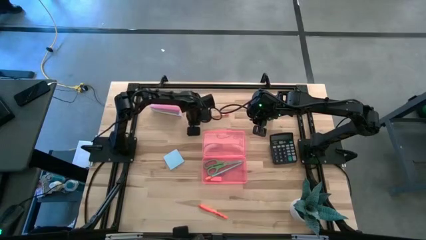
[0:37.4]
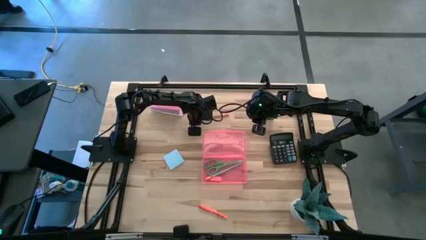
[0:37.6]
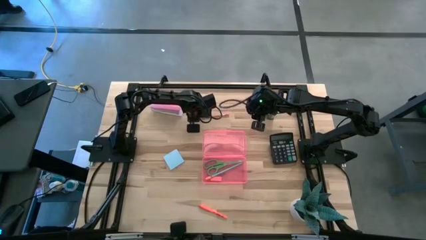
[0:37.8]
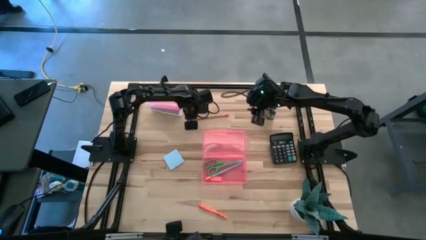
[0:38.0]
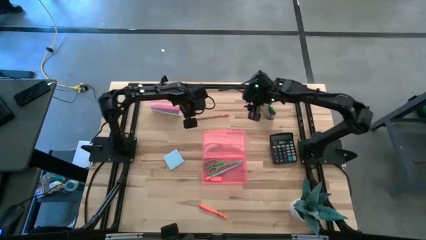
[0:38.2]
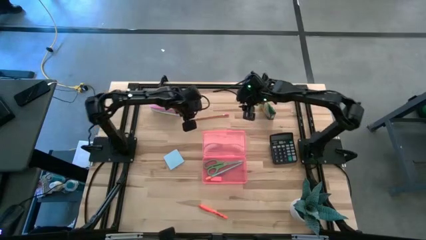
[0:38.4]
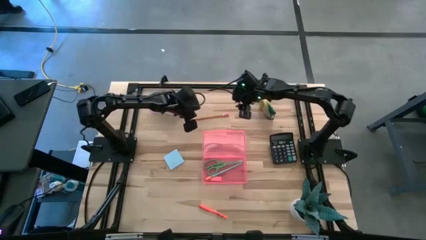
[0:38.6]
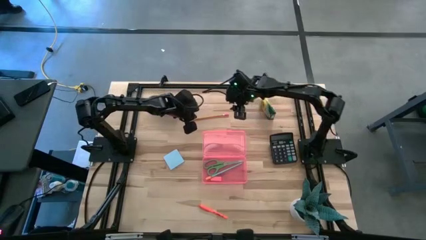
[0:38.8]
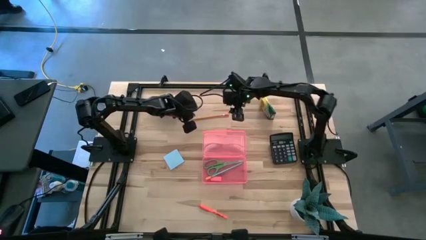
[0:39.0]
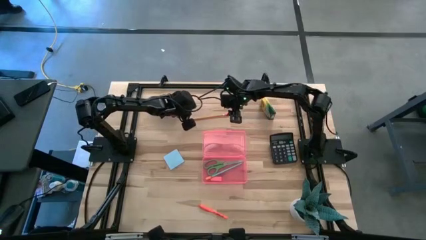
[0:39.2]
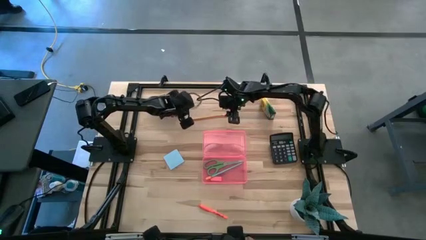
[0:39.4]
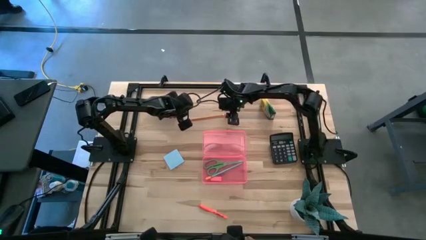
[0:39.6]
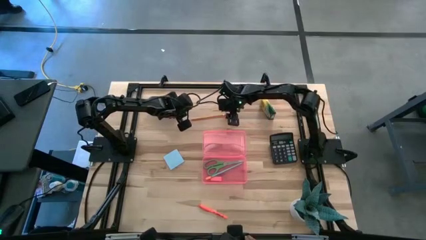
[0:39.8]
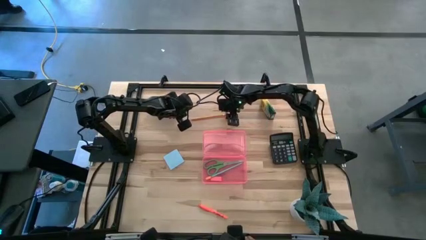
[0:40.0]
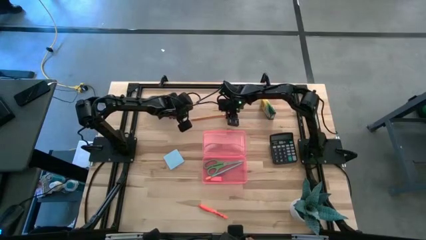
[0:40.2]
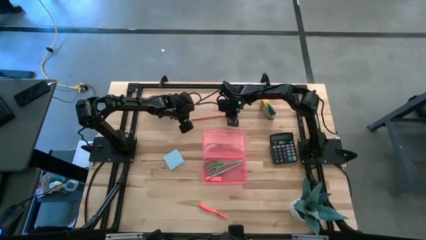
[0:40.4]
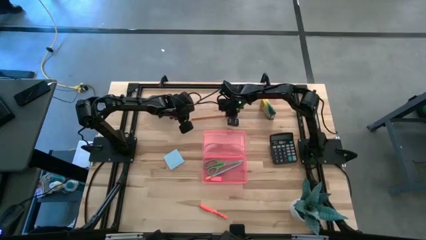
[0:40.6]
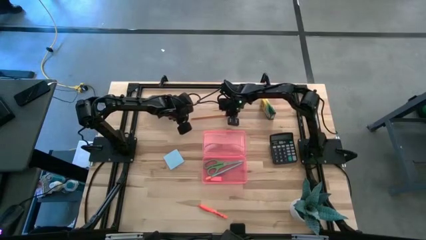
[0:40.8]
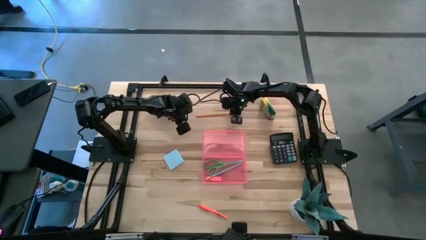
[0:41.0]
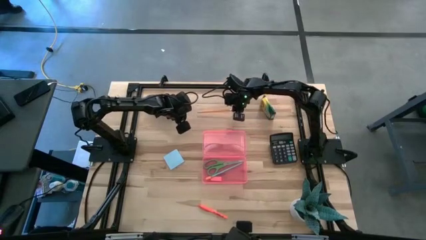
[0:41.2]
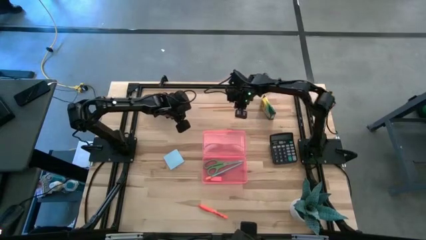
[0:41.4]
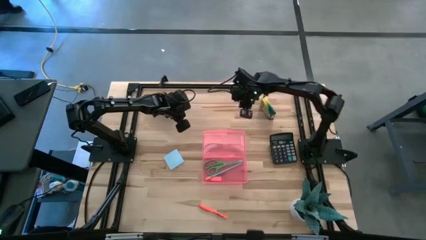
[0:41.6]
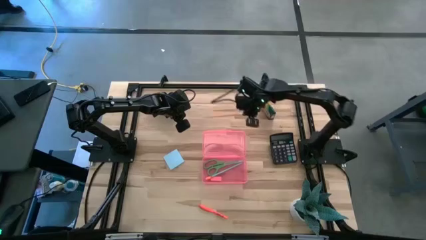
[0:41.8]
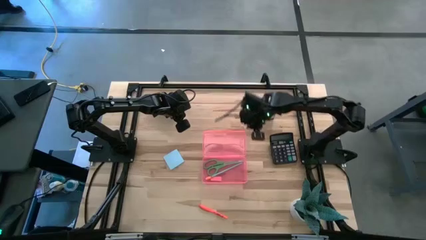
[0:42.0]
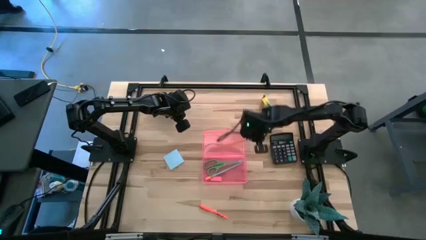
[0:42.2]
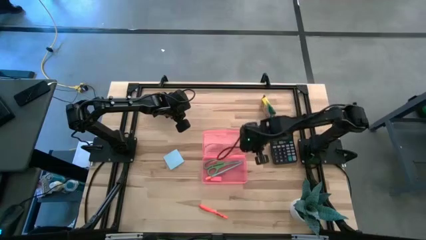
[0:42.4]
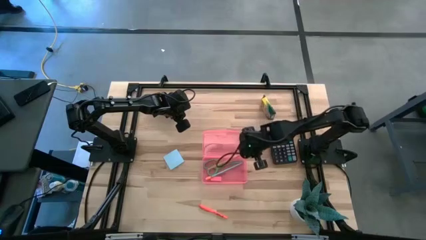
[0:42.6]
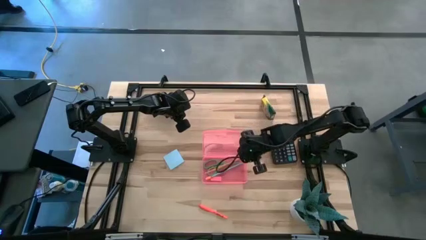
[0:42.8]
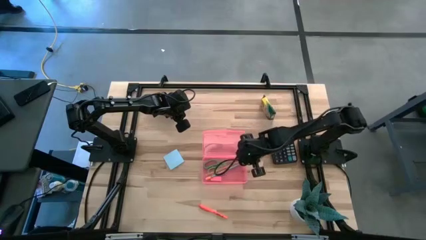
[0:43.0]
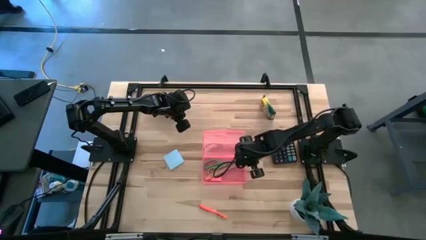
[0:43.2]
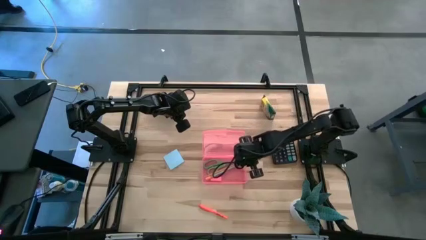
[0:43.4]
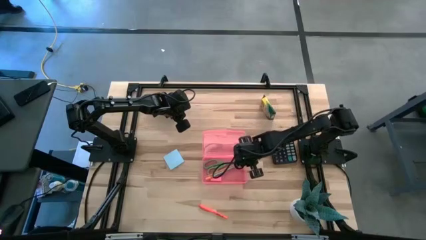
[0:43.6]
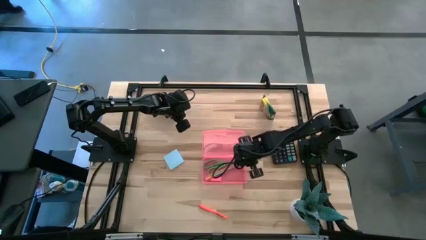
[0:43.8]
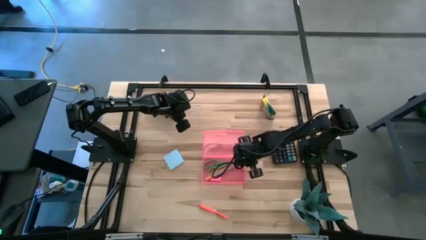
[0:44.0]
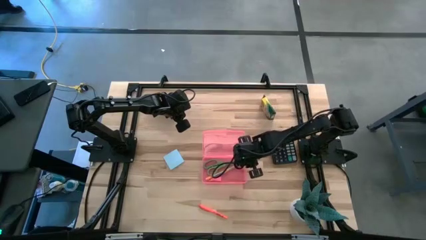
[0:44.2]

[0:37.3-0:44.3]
Task: Pack school essentials
Put the orange pencil into the supply box

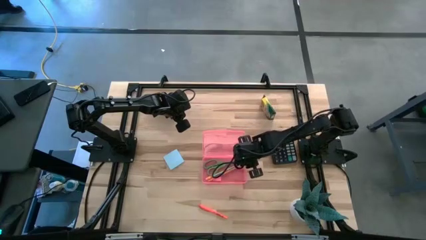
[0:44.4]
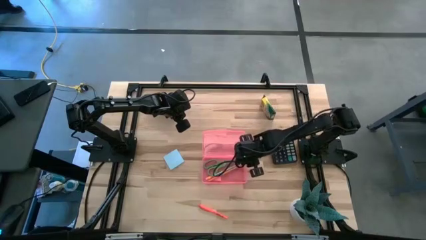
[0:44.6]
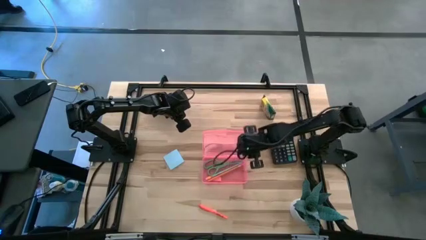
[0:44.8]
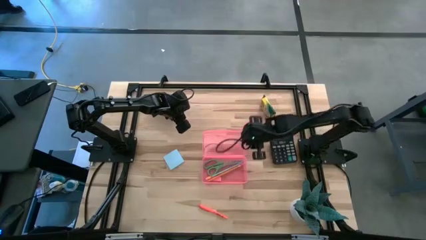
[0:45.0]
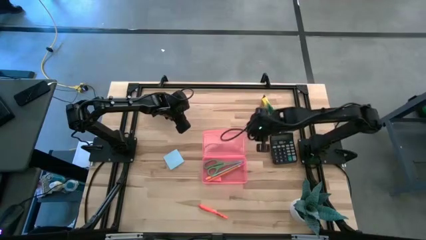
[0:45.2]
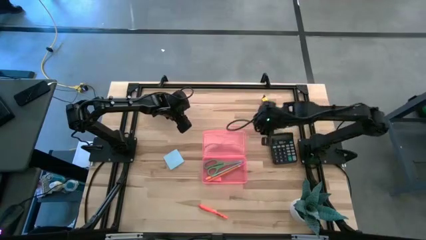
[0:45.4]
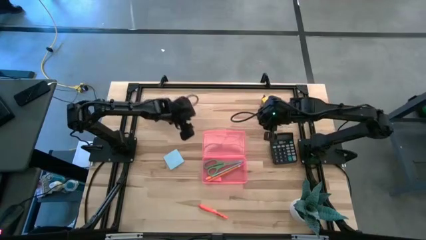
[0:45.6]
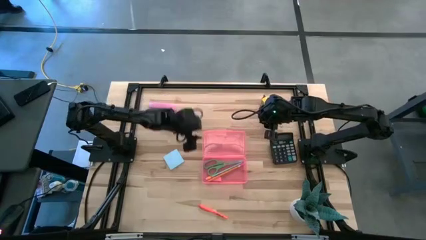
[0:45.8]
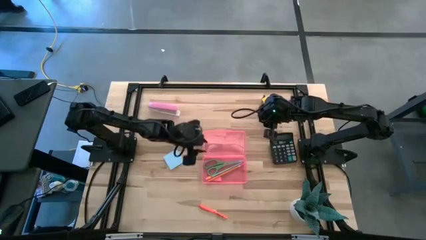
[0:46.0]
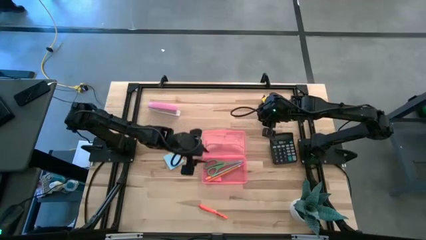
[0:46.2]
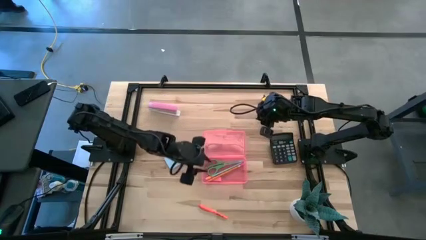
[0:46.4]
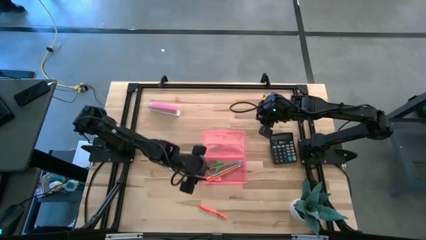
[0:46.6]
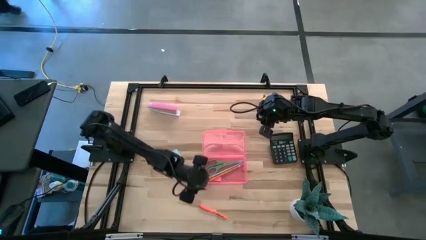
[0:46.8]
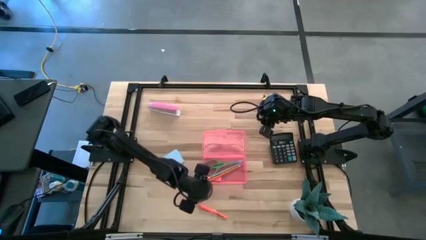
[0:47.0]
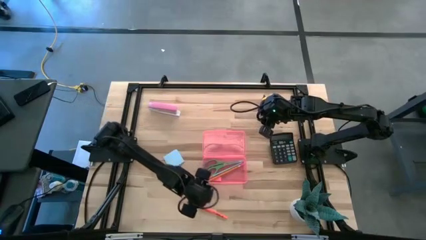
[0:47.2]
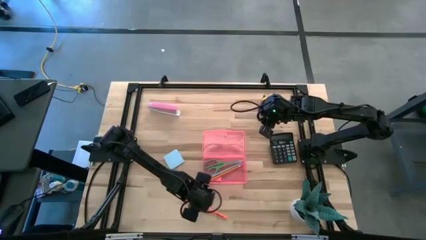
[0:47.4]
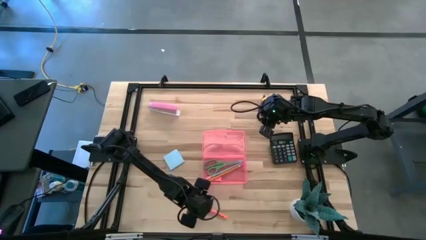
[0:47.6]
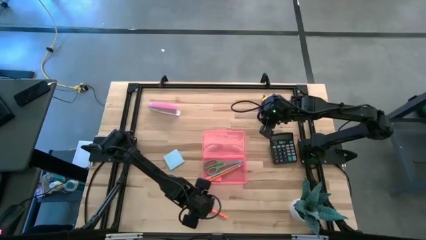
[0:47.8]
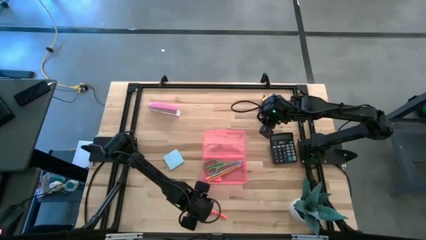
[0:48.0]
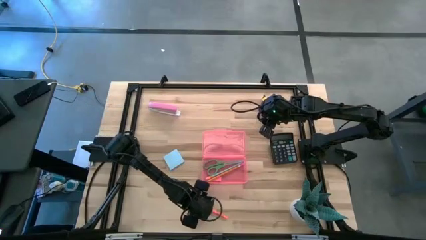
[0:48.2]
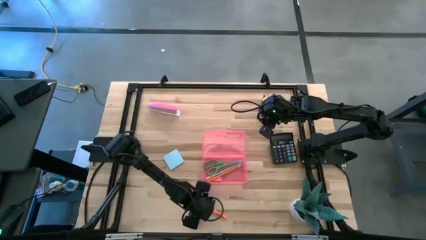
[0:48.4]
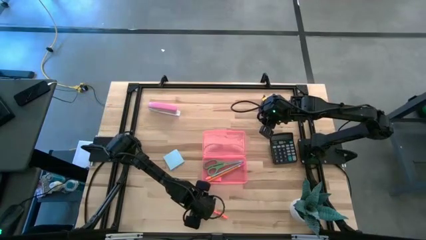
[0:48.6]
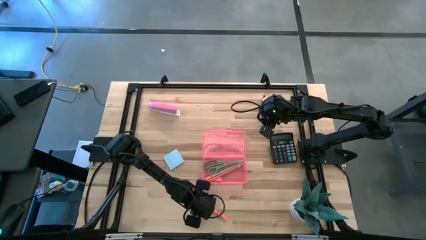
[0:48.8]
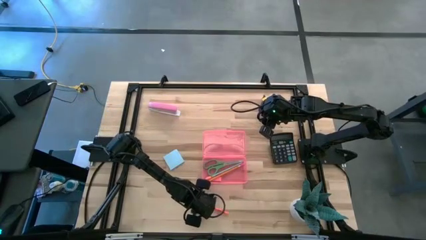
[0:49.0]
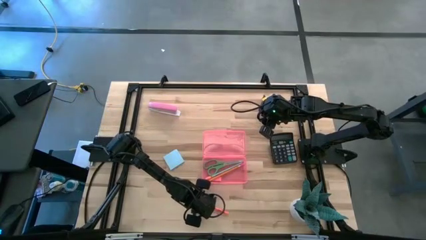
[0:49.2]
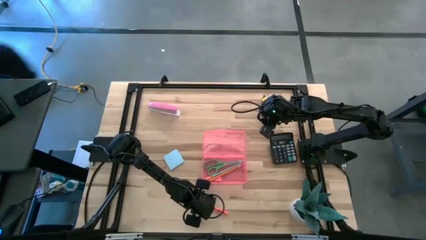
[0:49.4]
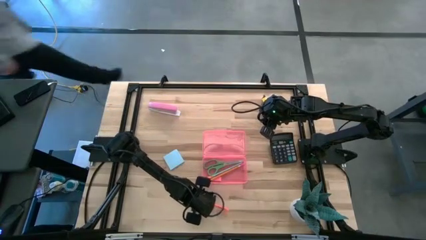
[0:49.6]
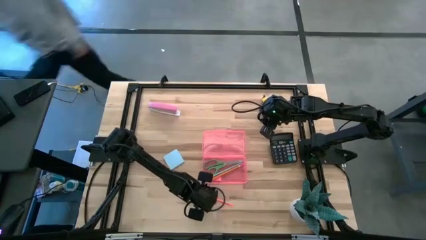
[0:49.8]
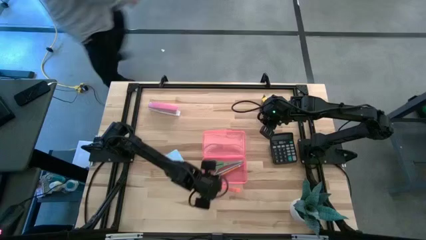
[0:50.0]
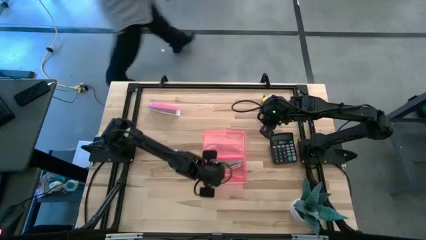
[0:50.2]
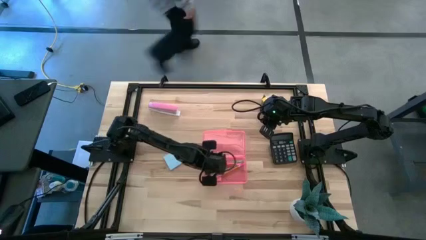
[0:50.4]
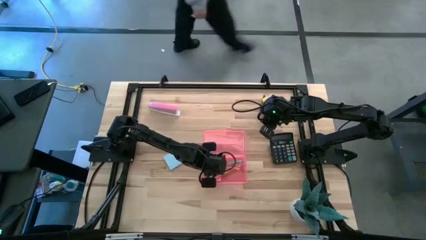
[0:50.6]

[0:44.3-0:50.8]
Put the pen into the supply box

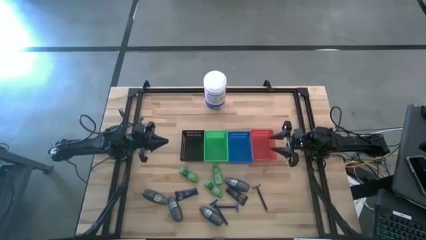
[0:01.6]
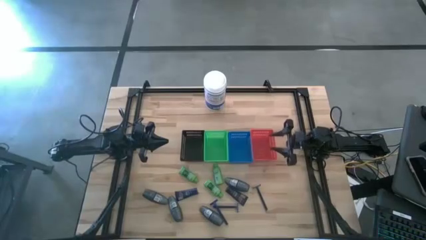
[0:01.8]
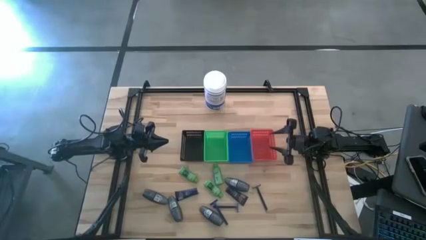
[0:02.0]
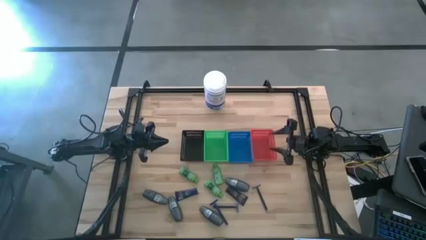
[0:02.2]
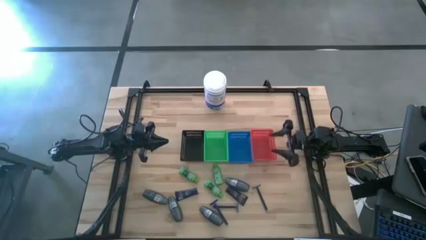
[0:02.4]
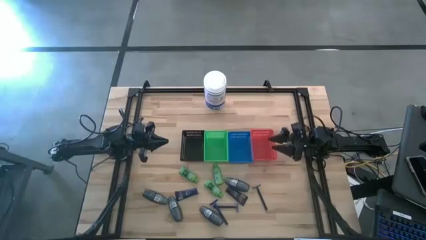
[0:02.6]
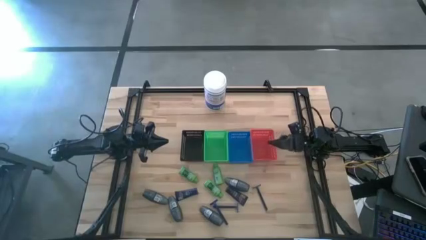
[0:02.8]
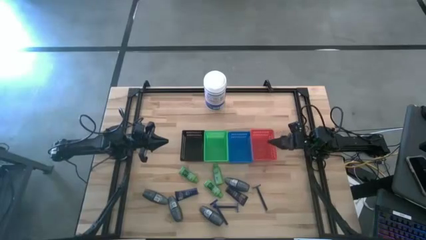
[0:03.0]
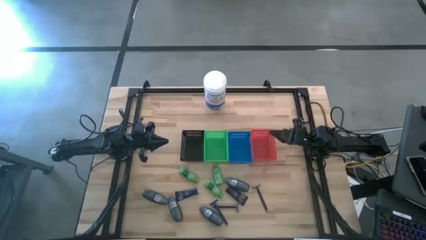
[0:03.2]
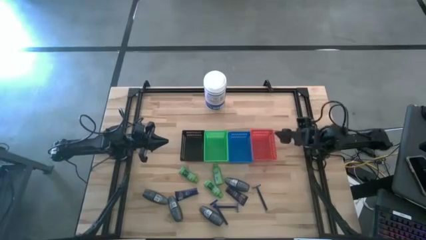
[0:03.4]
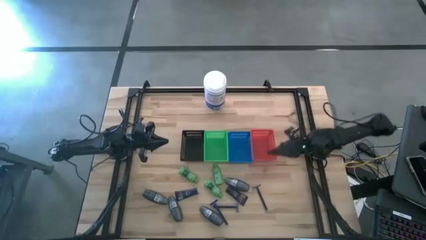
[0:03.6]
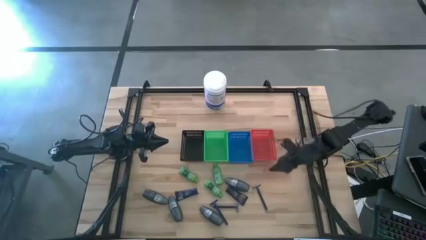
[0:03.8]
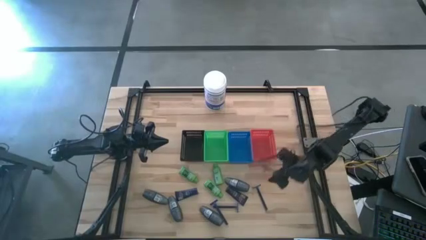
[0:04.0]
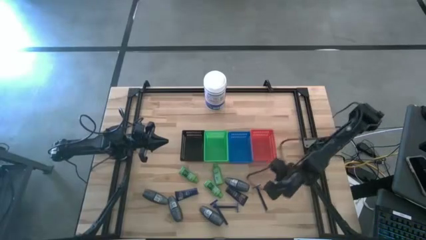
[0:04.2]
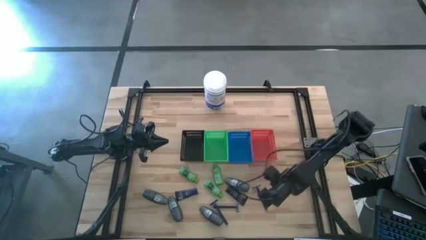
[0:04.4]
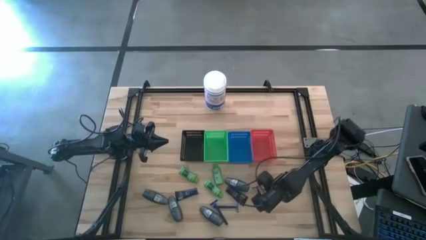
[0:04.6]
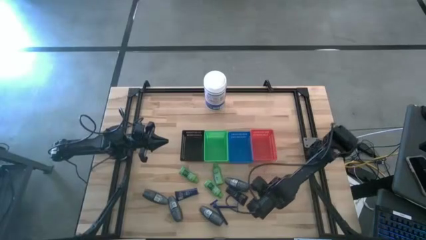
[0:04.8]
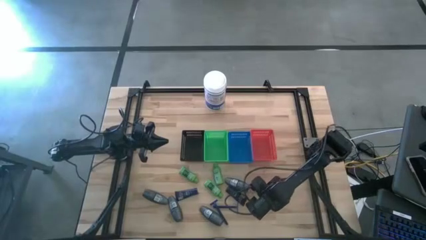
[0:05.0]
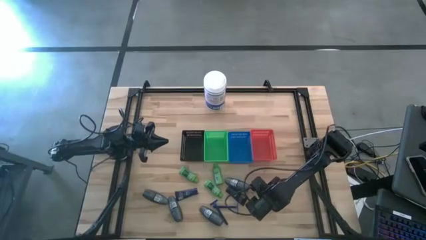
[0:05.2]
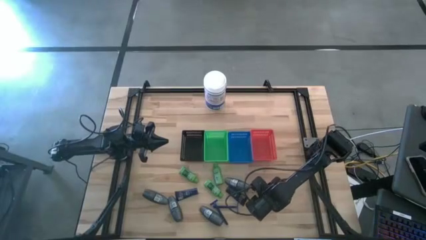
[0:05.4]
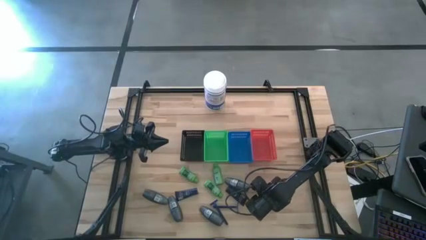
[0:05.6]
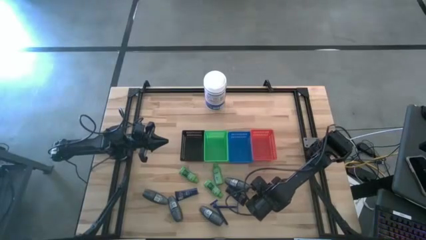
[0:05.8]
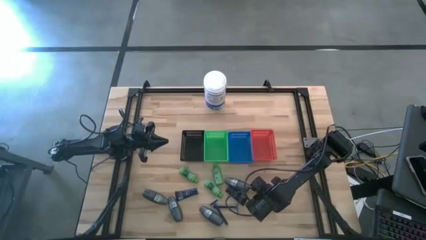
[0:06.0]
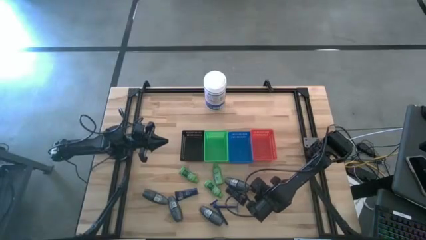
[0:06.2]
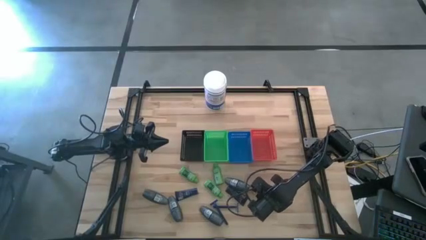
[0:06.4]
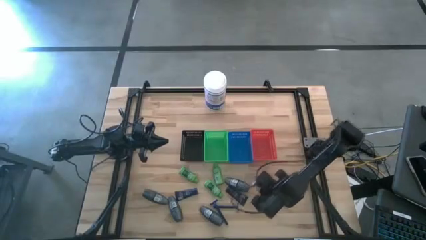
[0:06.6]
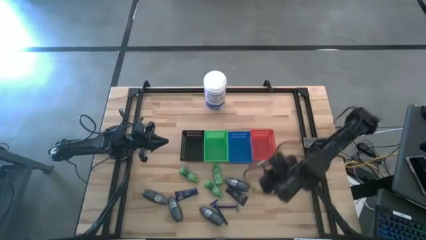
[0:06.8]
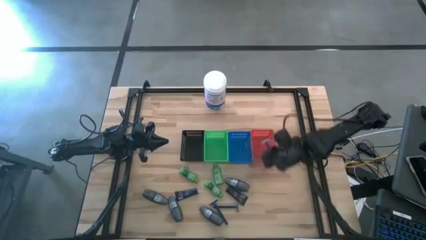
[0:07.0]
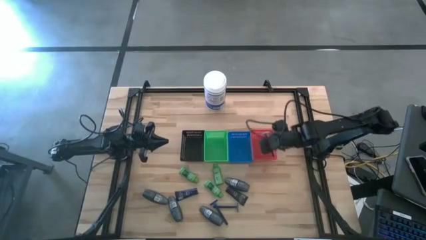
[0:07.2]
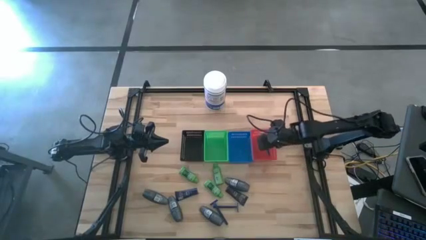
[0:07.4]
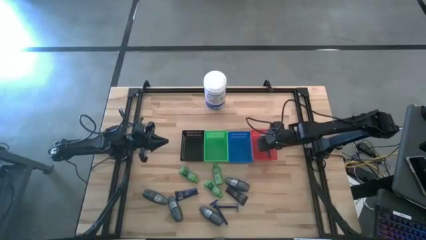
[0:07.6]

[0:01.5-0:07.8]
Task: Pick & Place Travel size toiletries
Put the blue razor into the red basket
